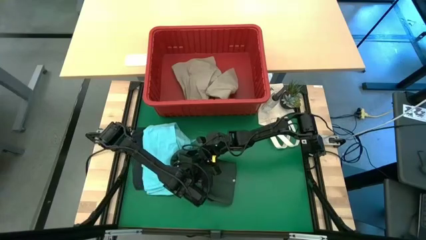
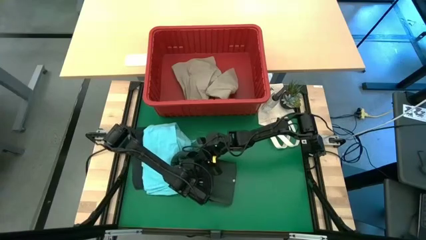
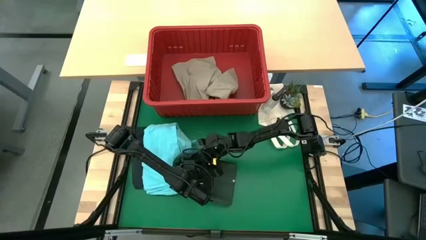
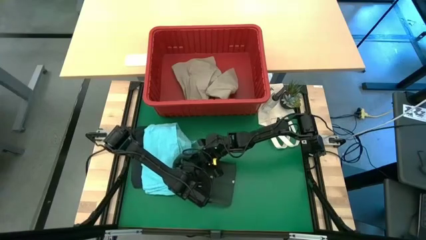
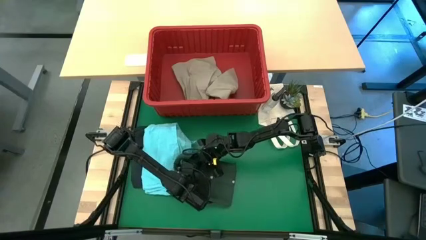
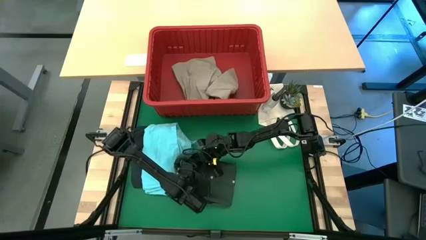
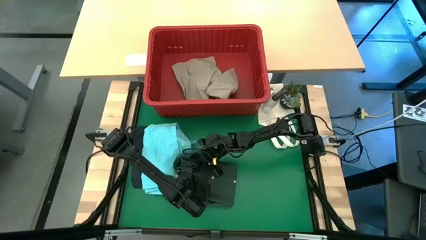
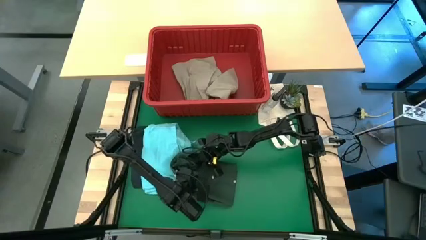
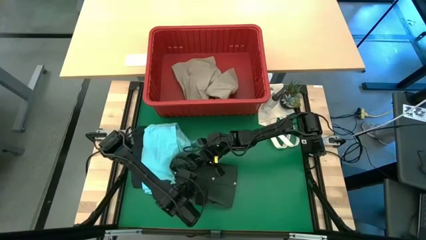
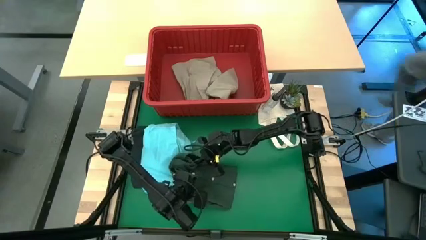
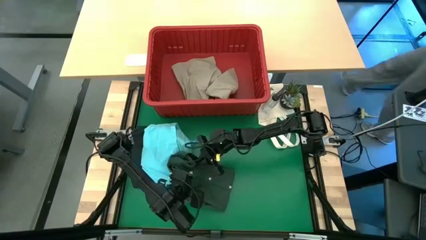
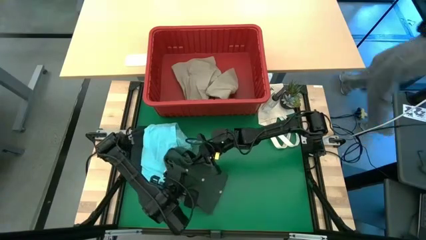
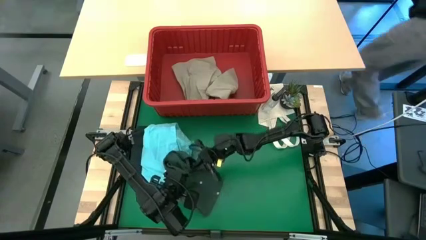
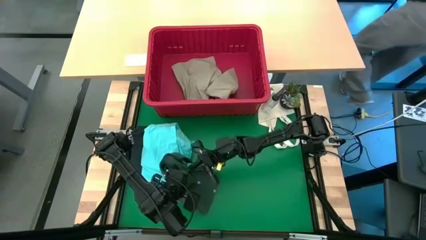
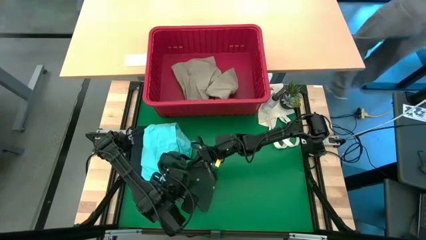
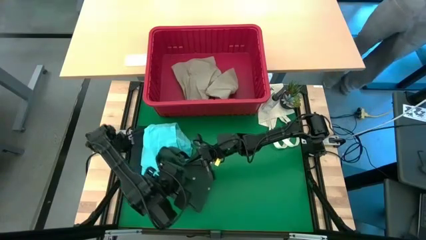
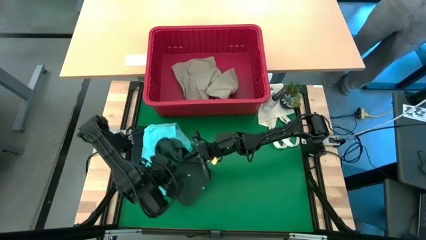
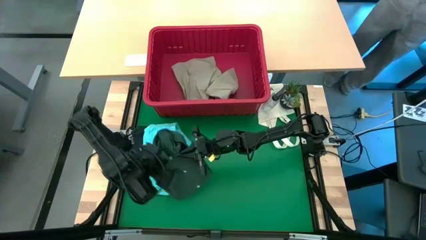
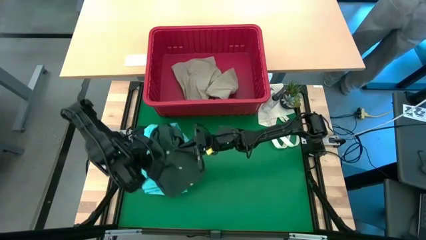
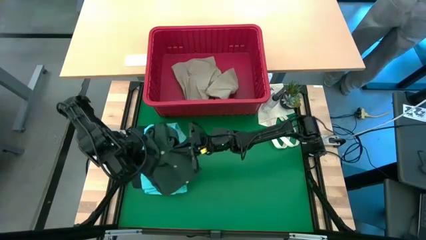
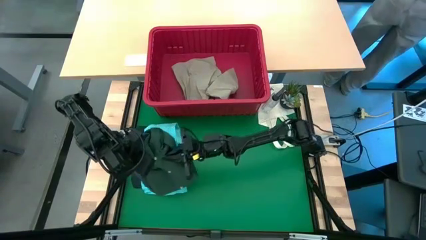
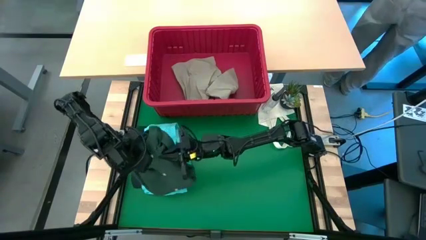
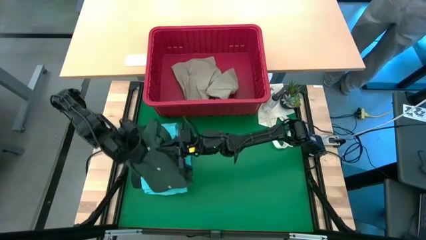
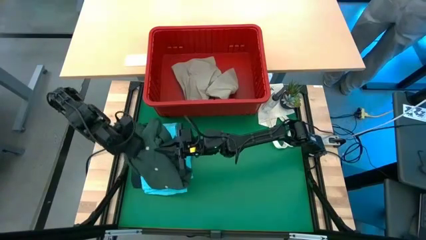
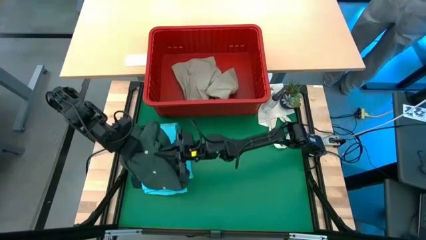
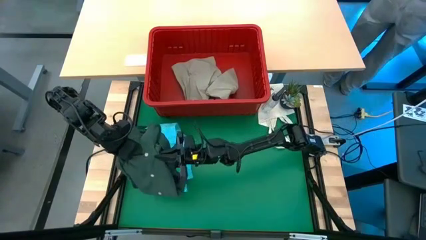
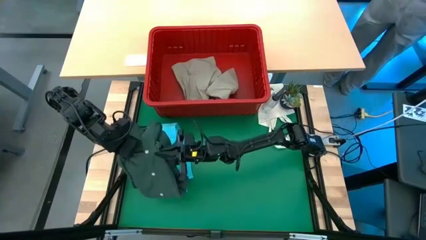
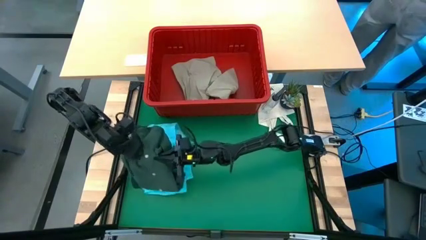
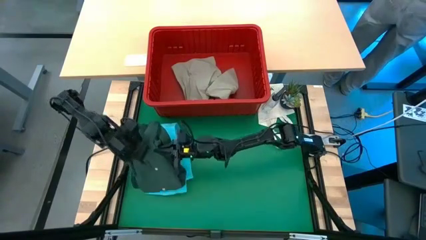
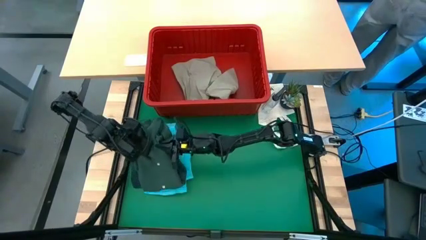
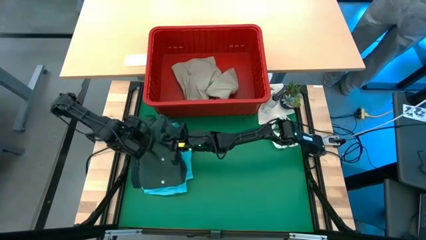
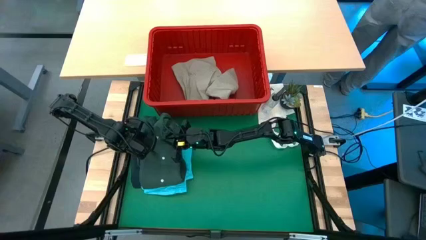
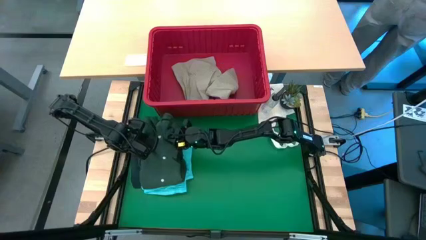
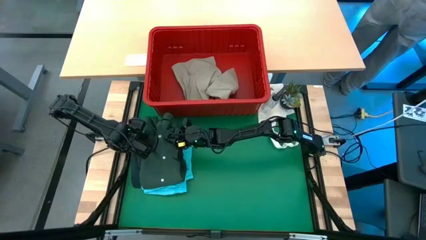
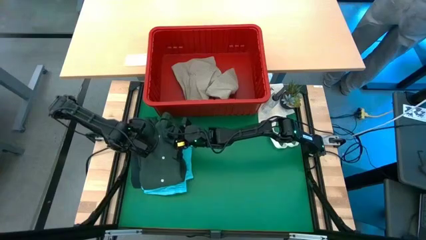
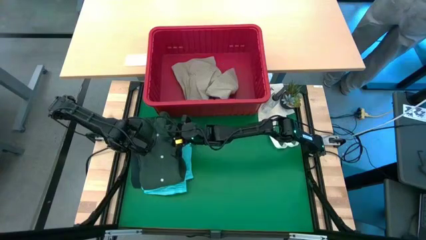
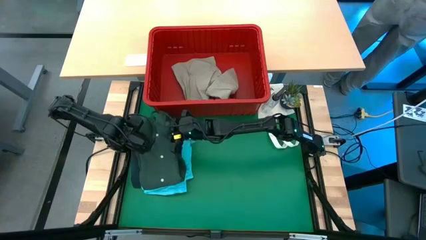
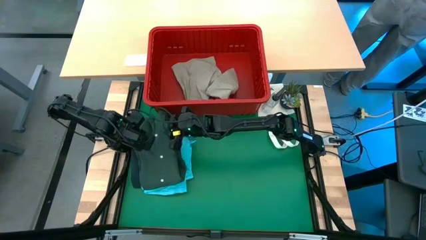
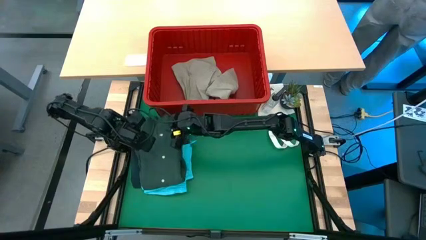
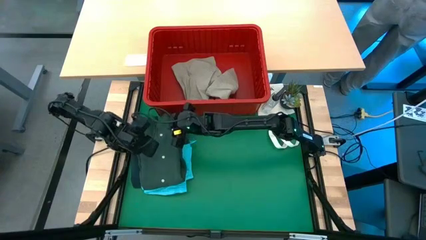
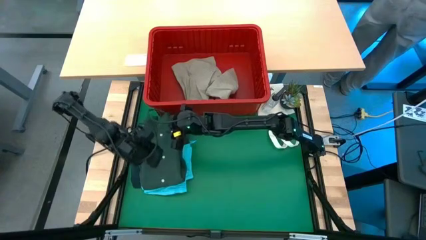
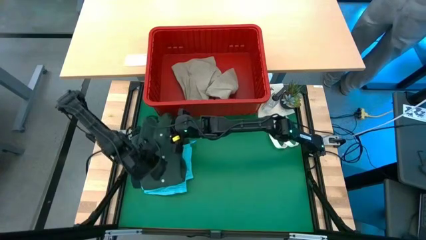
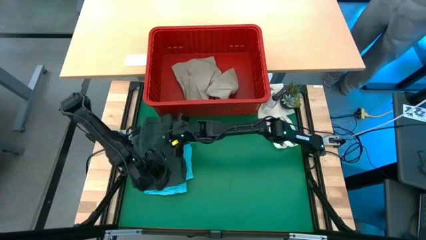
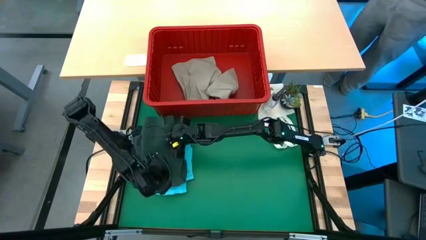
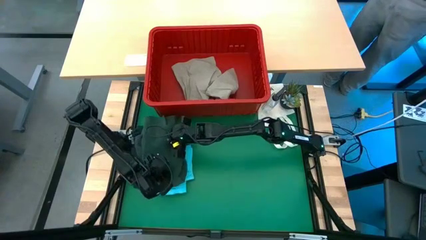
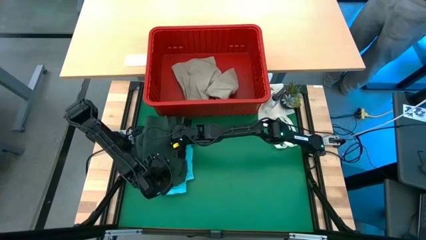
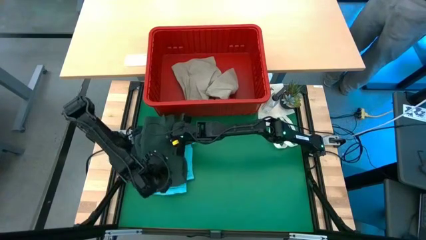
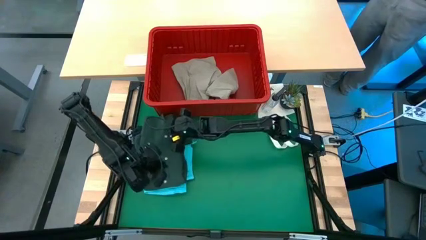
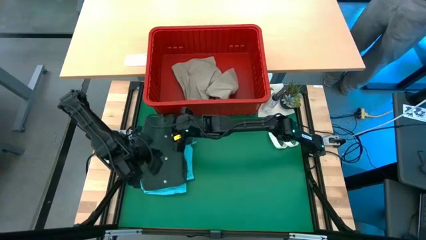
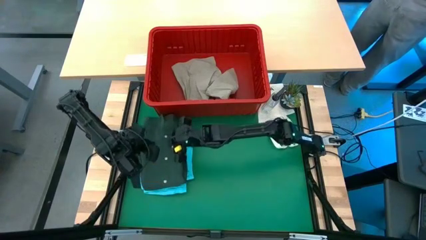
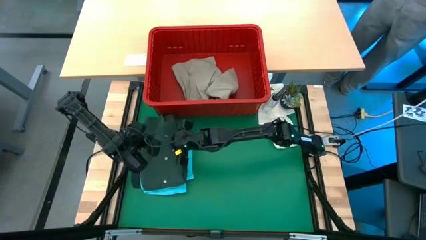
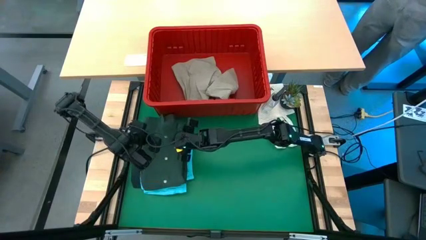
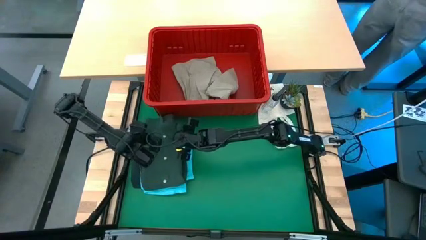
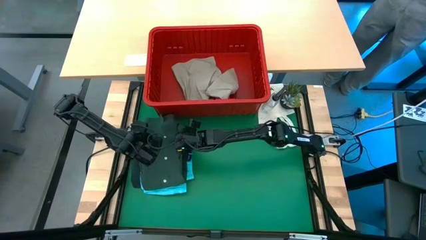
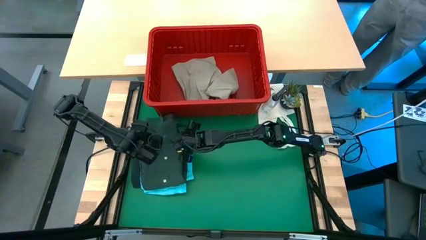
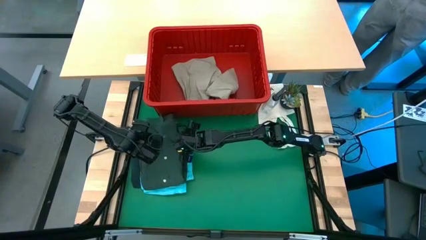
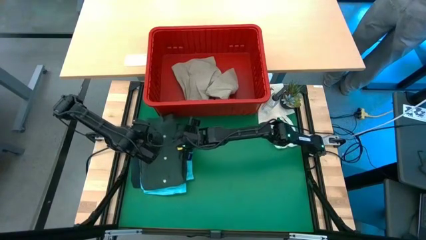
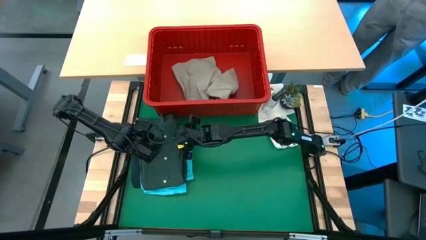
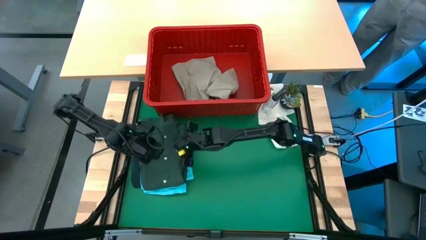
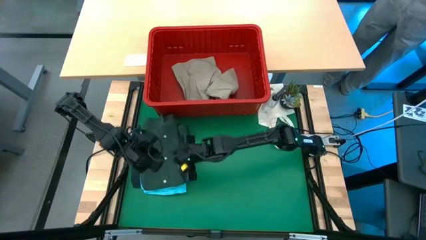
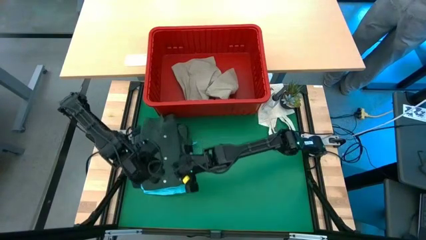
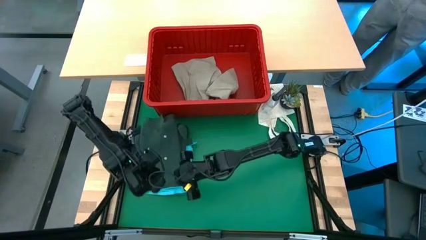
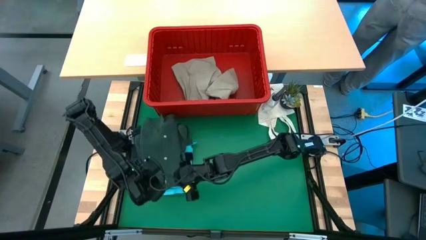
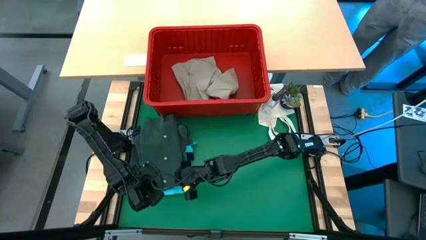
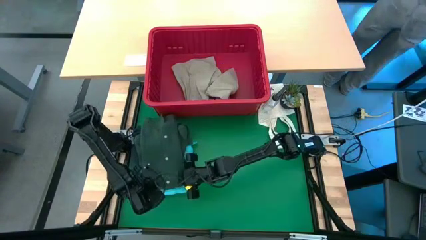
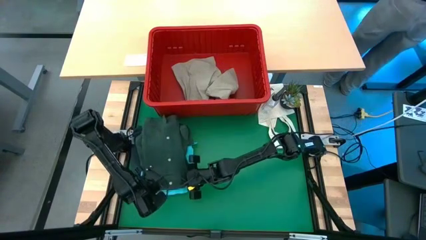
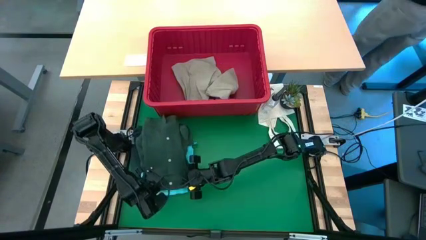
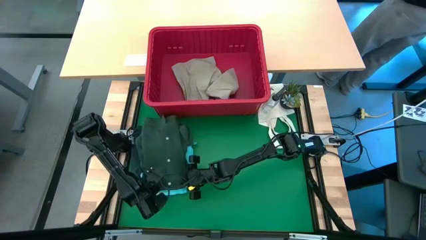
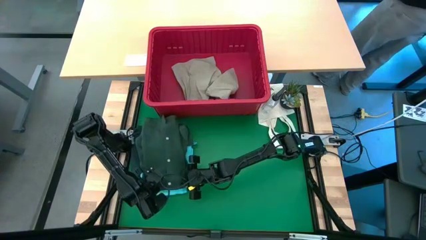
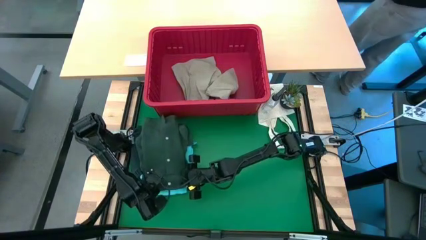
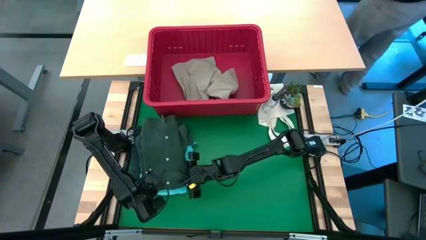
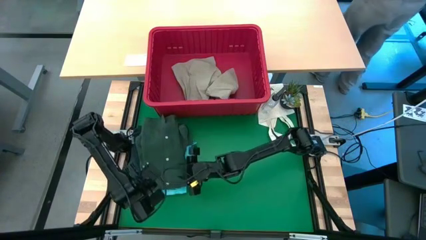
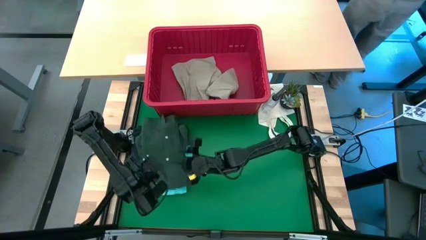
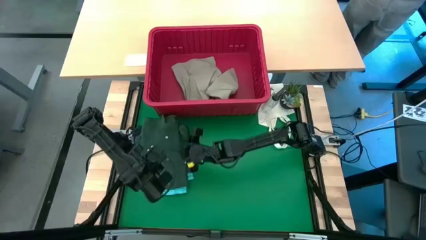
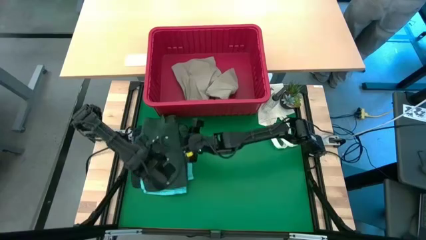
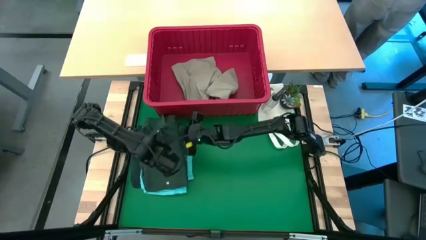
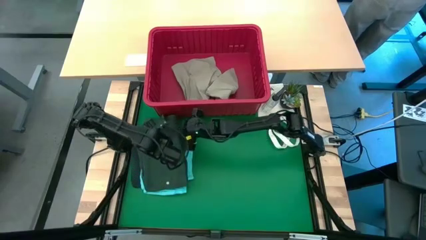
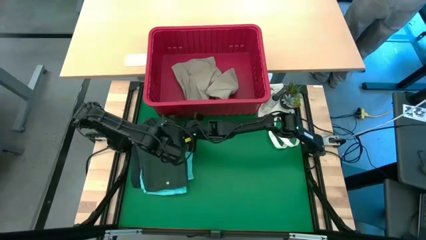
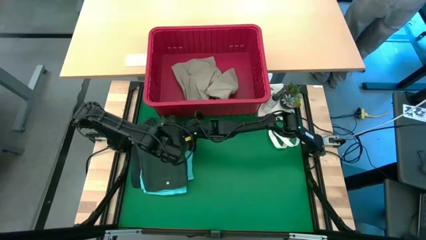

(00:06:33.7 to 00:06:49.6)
Task: Fold Laundry from Bin
Stack the folded green polo shirt on top of the folded blue shorts
